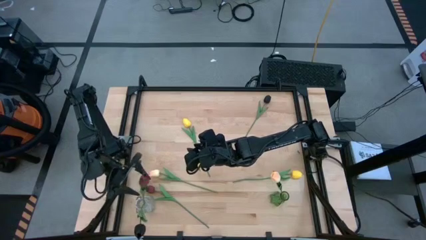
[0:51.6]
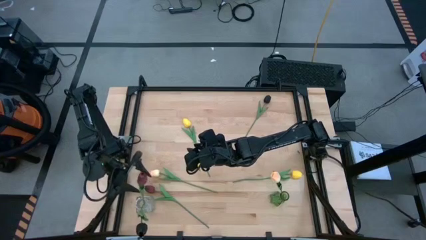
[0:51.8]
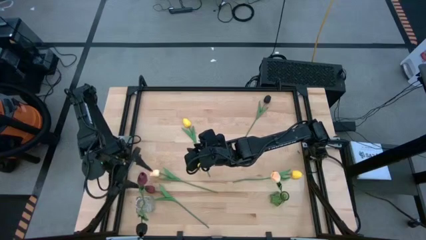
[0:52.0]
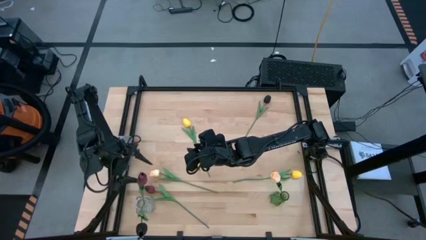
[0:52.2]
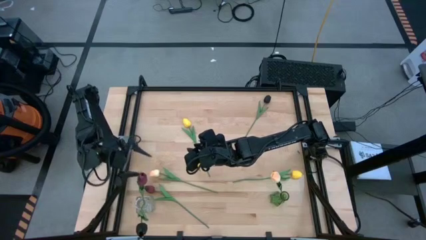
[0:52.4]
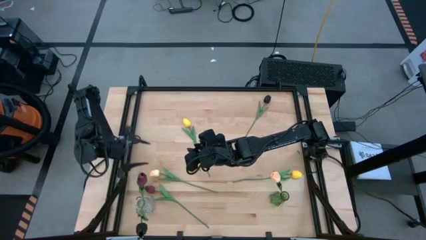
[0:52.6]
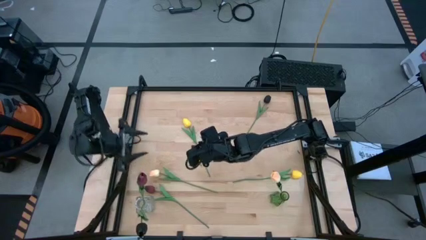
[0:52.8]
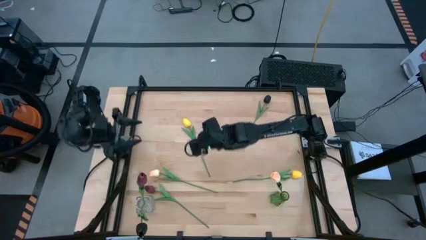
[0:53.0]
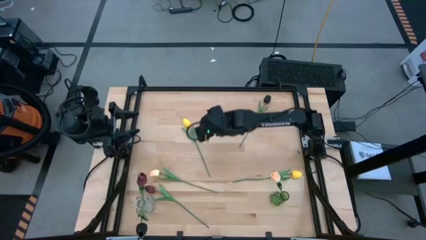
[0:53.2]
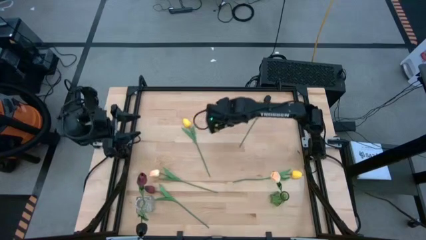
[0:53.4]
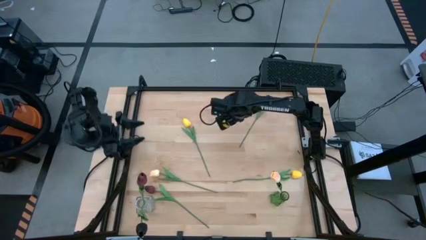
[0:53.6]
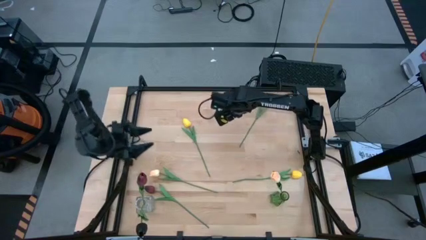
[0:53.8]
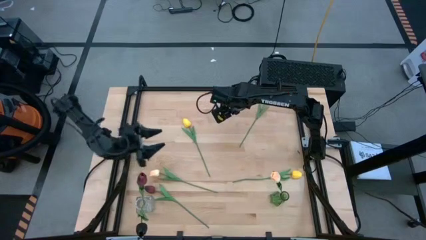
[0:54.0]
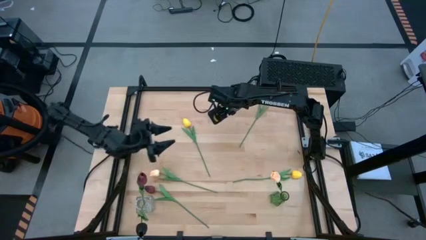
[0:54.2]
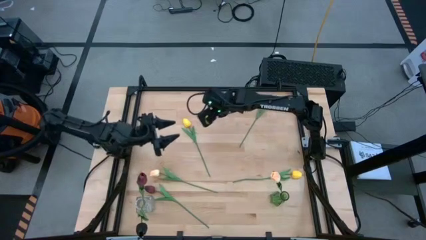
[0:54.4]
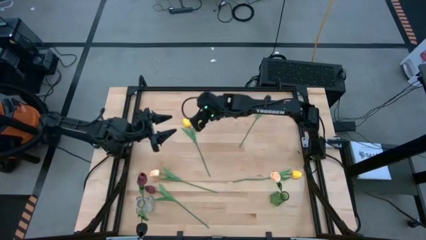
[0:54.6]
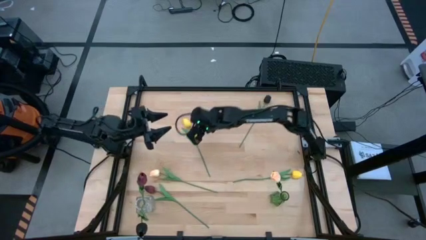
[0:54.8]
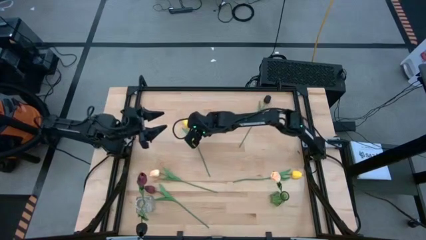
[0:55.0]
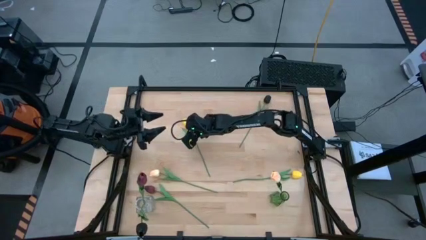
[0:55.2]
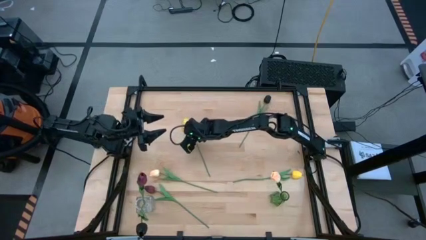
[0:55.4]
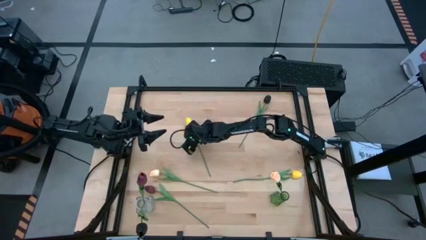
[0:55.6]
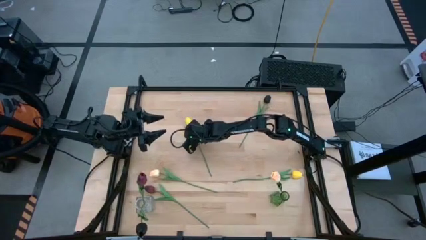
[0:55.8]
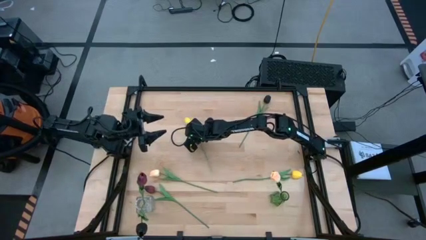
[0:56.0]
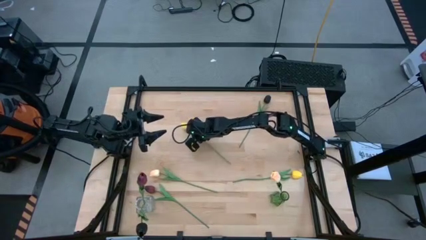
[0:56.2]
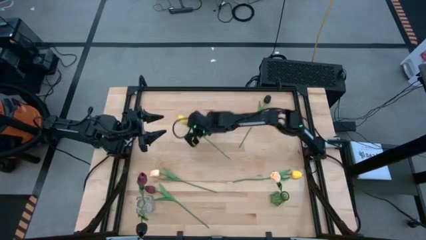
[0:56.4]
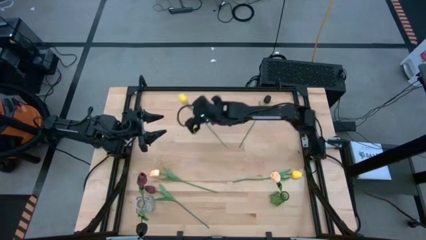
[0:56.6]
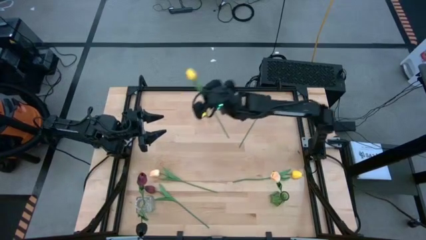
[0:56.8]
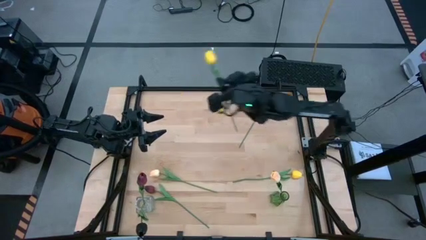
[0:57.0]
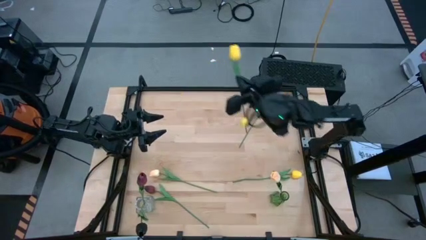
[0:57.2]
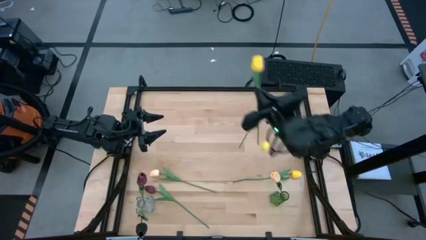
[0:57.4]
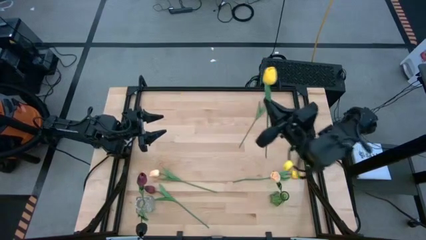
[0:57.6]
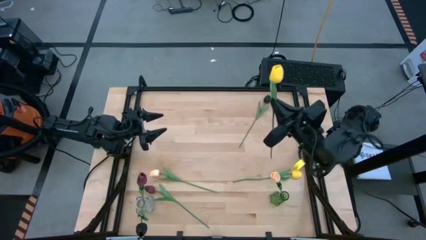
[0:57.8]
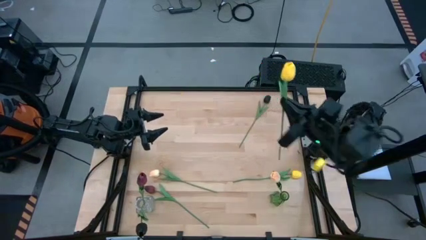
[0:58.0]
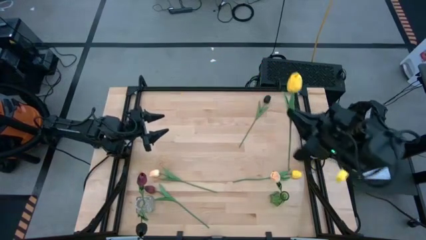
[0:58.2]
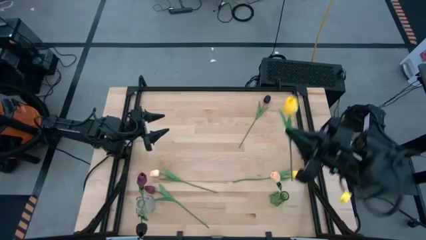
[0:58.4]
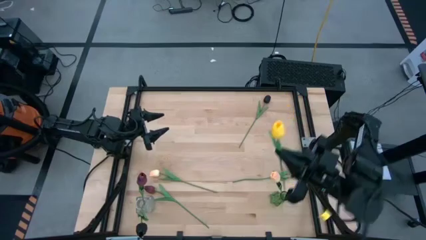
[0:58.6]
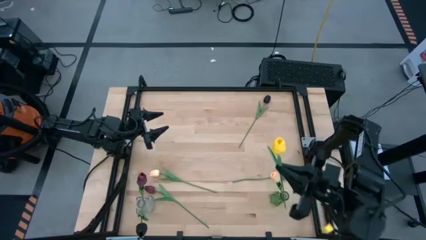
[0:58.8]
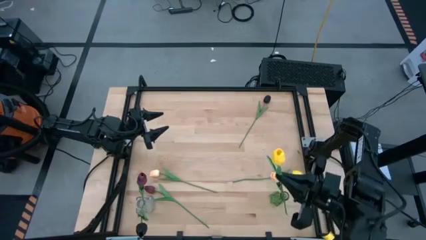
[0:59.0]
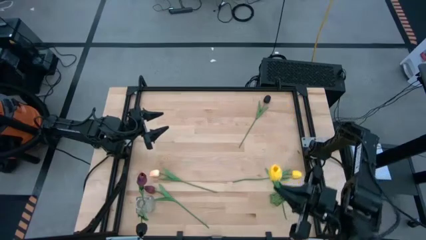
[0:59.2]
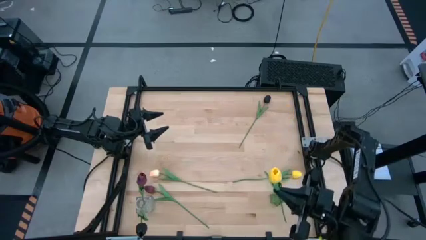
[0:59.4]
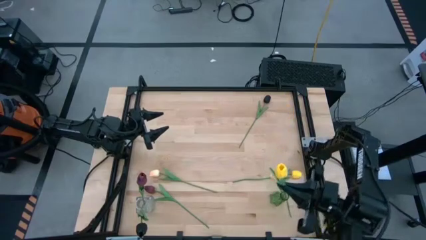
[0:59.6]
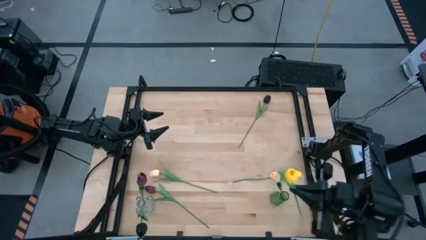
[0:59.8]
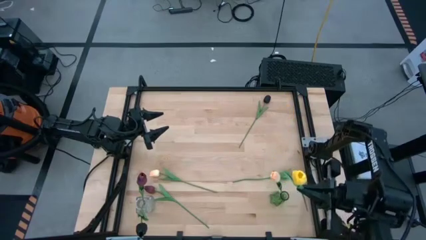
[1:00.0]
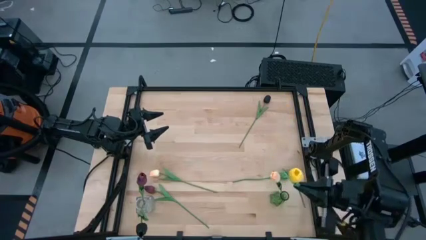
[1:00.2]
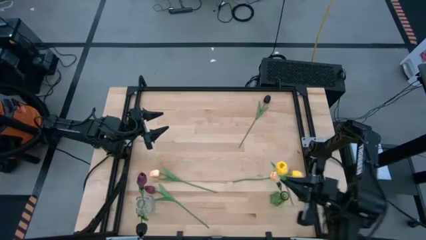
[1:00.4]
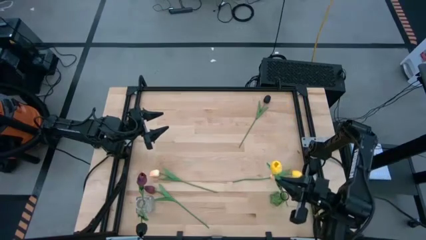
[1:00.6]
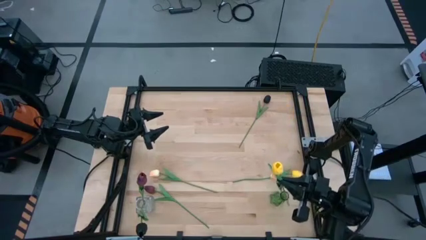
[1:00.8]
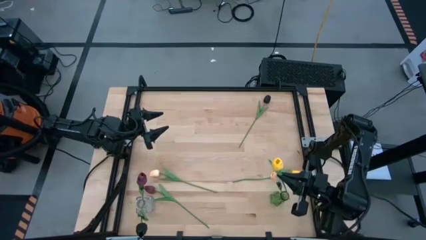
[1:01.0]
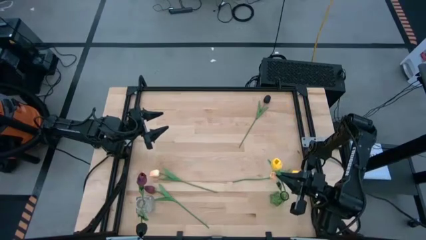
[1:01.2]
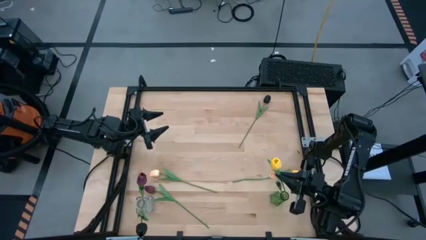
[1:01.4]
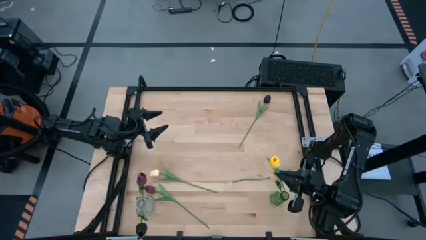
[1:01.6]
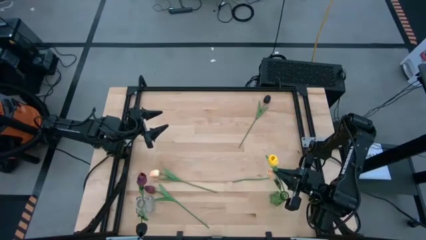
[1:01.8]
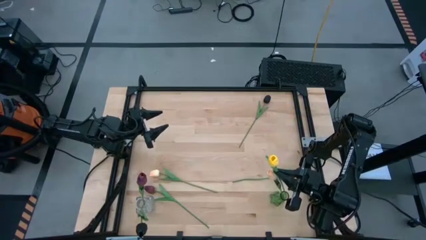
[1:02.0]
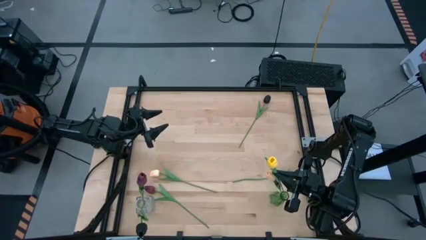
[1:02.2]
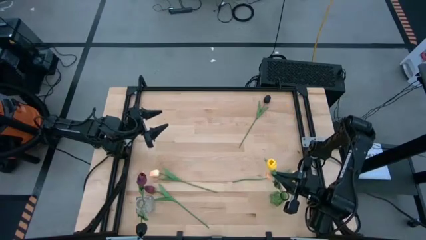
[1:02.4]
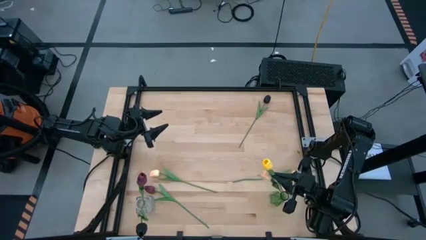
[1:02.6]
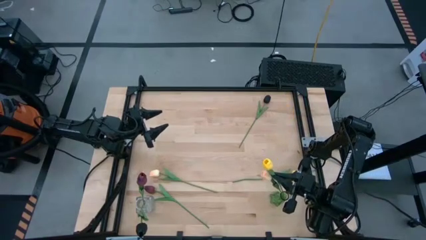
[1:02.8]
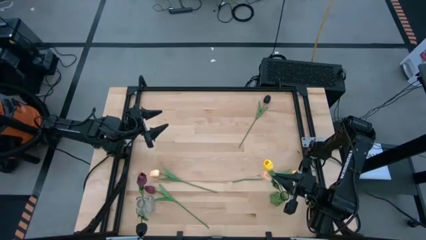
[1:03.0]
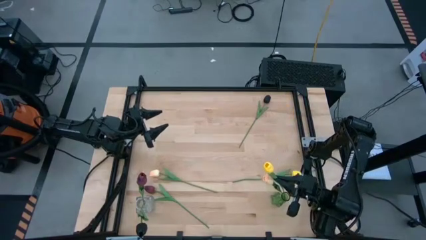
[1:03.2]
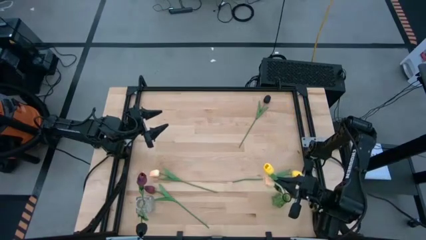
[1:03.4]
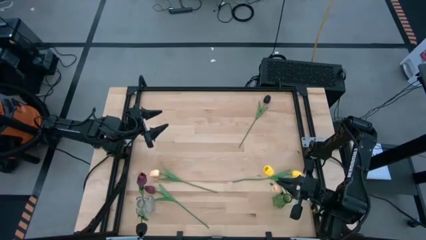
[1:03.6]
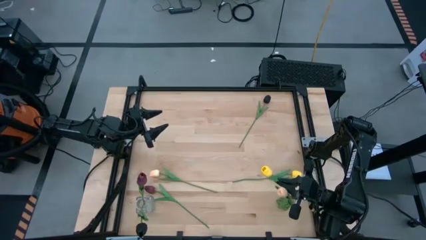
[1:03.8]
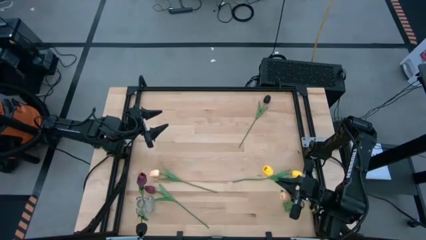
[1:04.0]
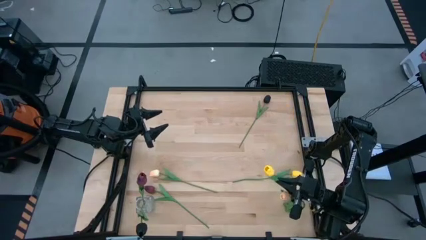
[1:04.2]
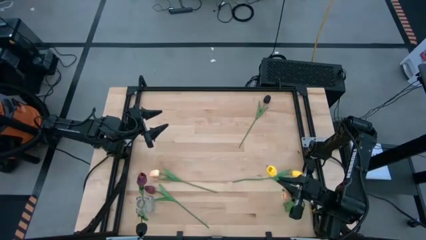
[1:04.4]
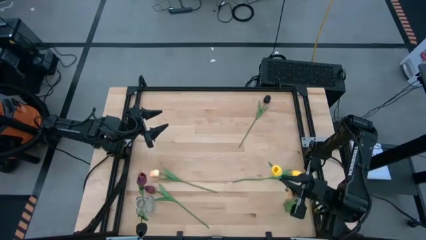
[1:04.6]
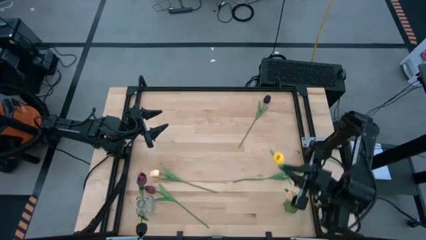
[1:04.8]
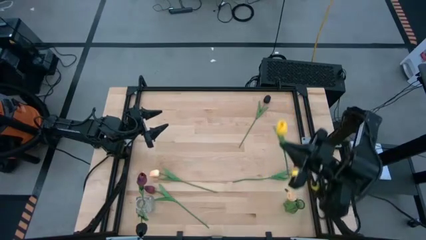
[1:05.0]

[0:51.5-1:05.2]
Task: Sort flowers into vase by color
Put the top yellow tulip into the green vase

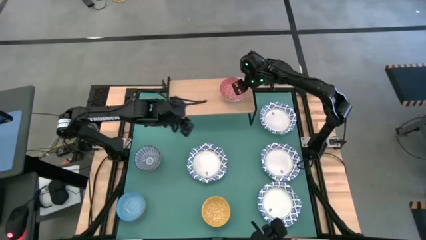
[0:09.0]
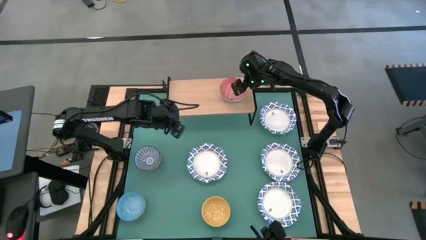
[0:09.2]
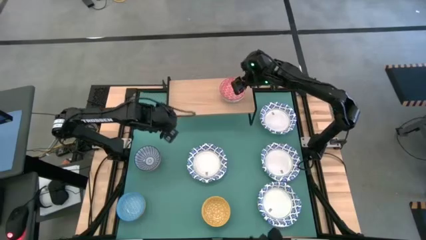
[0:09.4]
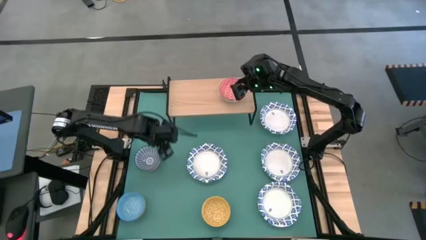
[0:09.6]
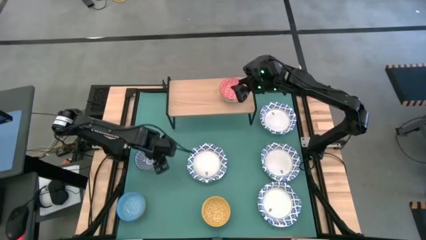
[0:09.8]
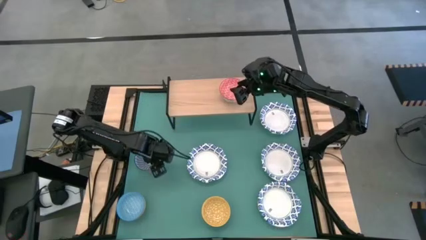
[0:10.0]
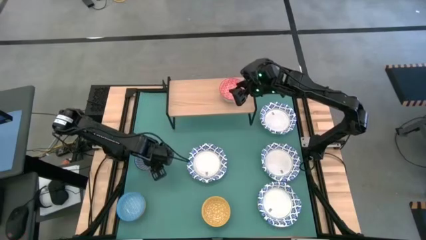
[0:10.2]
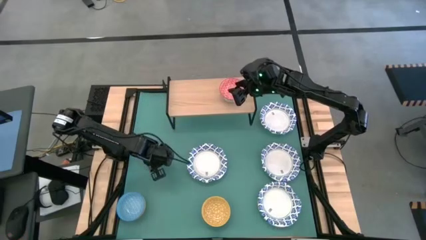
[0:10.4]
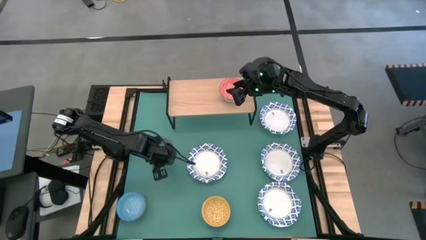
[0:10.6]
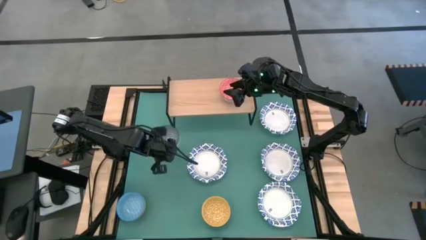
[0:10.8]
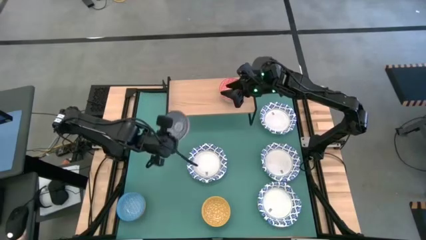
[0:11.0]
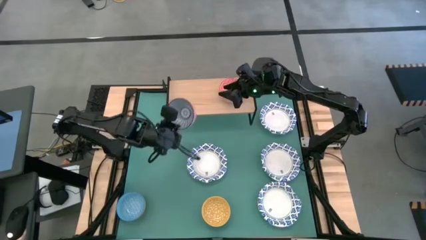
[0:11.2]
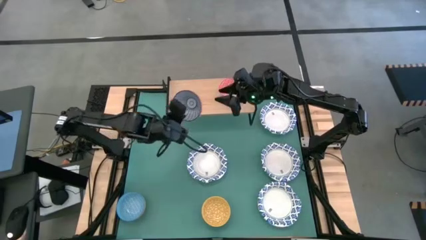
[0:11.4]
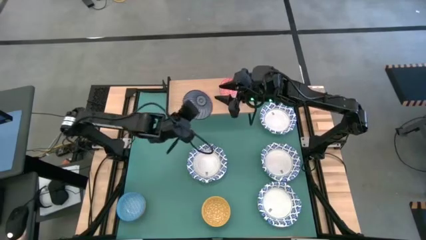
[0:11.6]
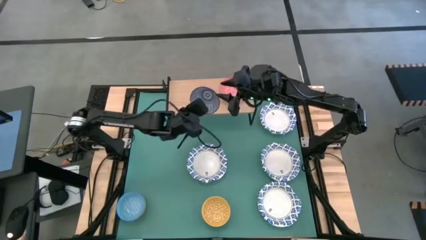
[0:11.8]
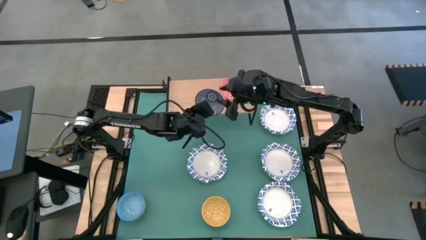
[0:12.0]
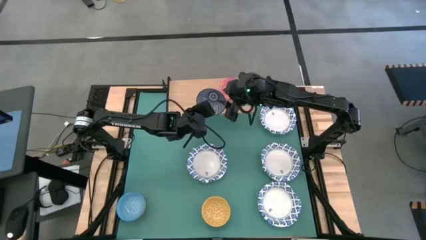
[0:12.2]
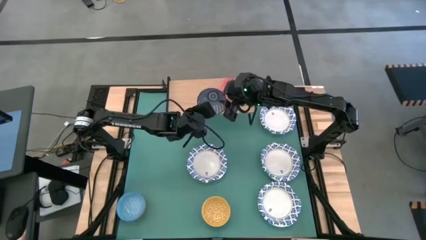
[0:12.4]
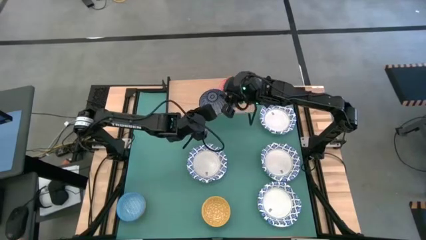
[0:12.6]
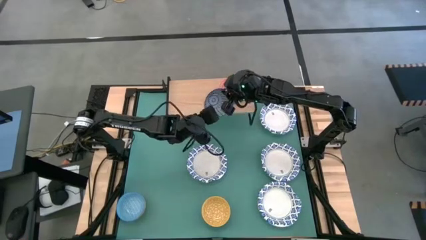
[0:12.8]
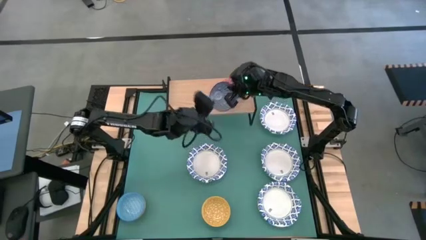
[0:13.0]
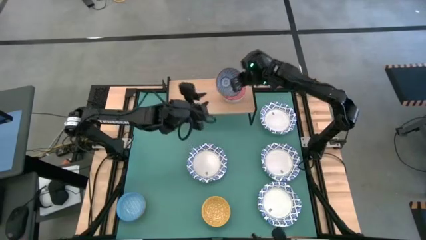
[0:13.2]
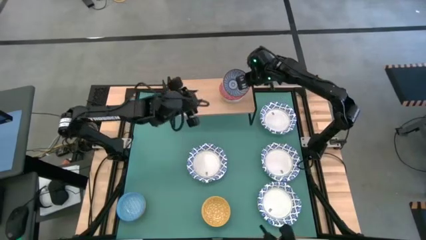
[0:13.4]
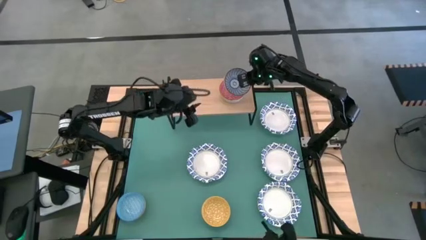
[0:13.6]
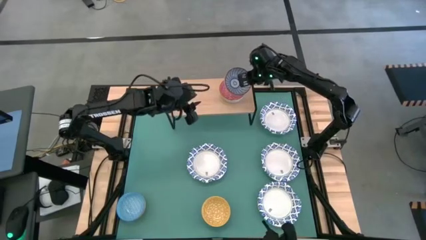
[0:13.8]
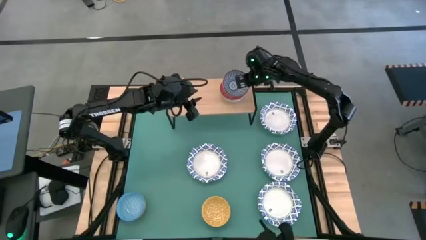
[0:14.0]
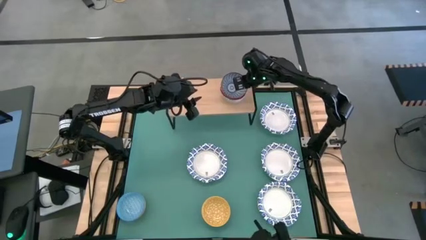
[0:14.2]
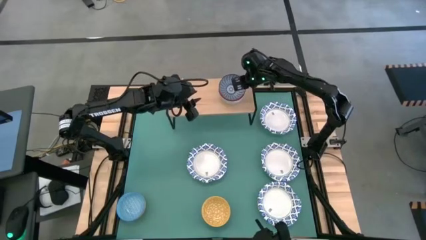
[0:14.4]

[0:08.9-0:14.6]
Task: Place and stack bowls onto a shelf
Stack the blue bowl on top of the red bowl on the shelf
